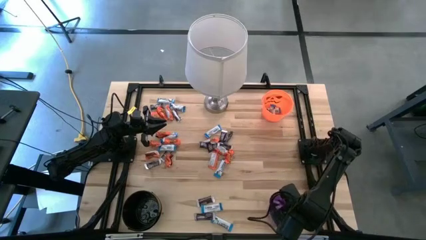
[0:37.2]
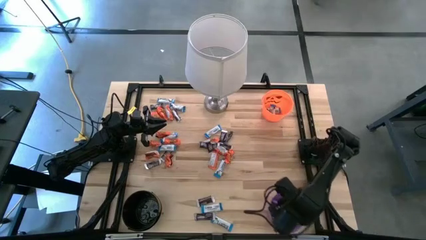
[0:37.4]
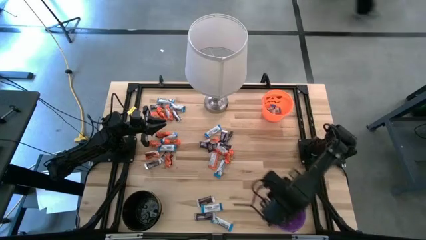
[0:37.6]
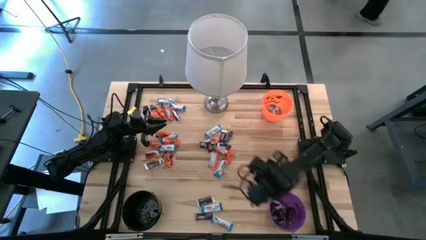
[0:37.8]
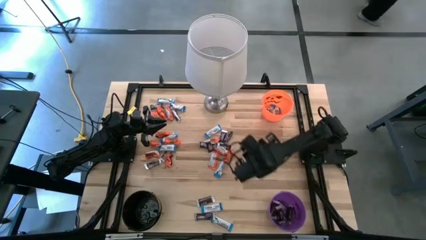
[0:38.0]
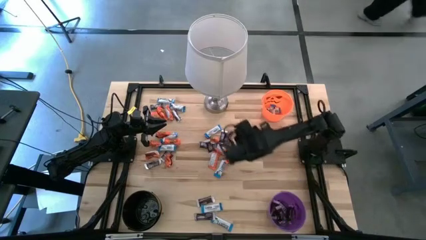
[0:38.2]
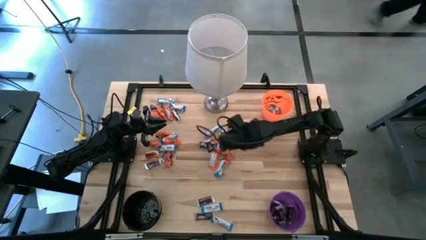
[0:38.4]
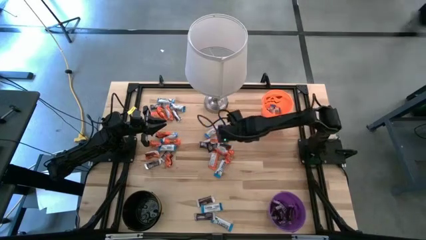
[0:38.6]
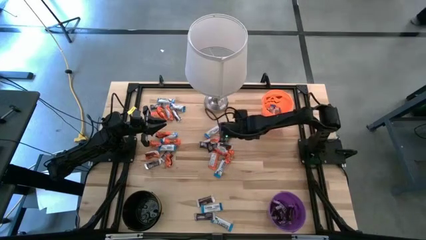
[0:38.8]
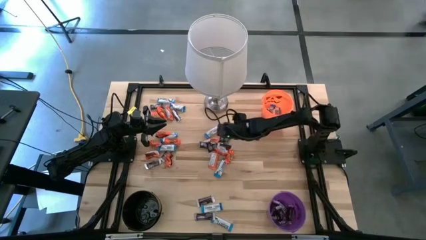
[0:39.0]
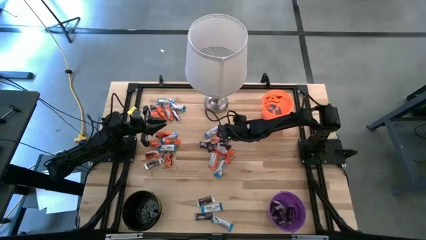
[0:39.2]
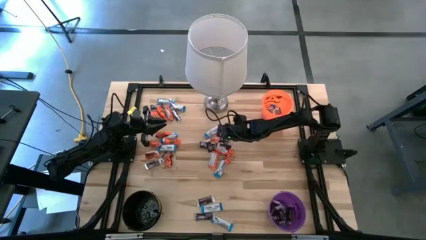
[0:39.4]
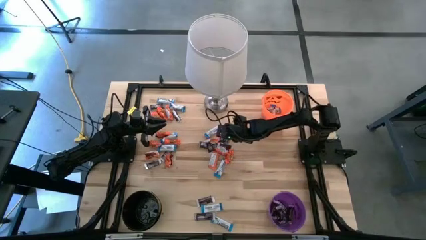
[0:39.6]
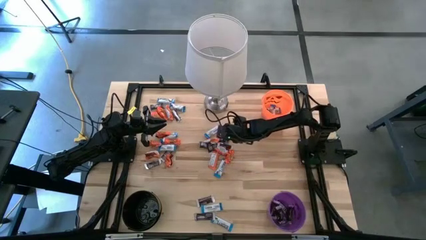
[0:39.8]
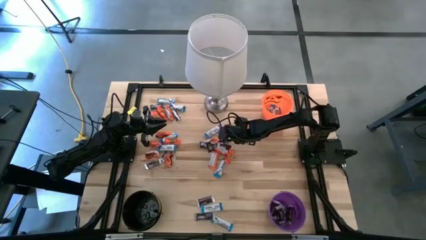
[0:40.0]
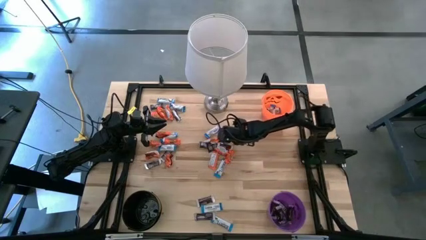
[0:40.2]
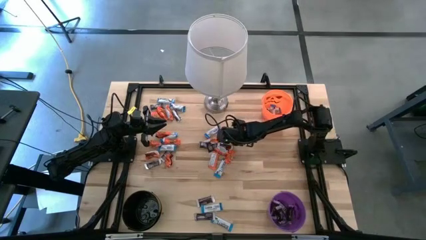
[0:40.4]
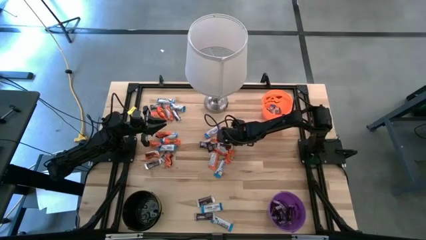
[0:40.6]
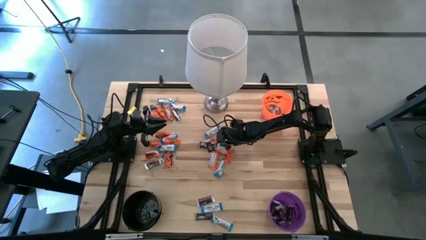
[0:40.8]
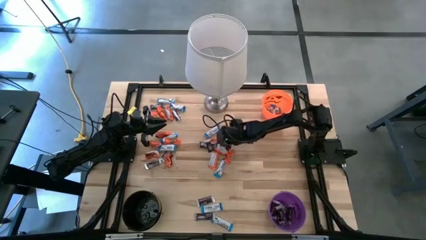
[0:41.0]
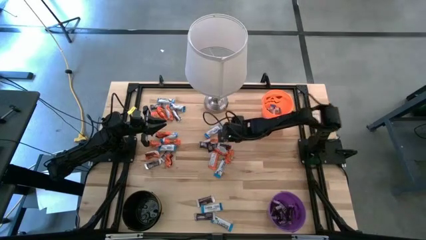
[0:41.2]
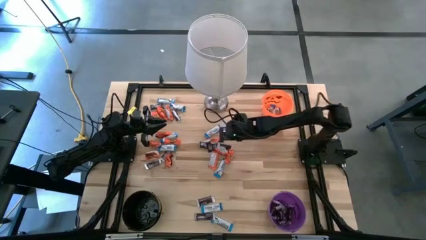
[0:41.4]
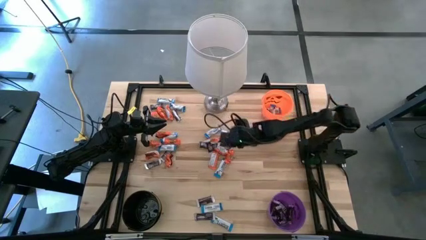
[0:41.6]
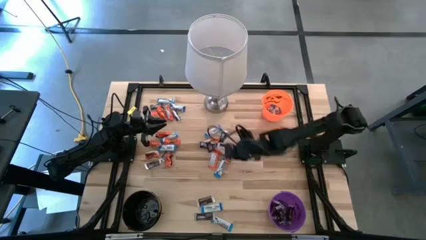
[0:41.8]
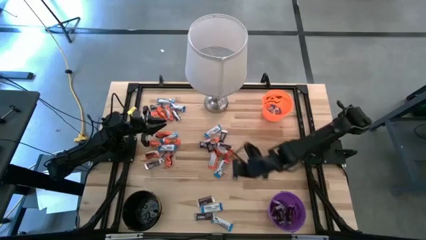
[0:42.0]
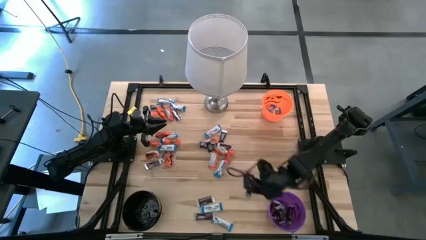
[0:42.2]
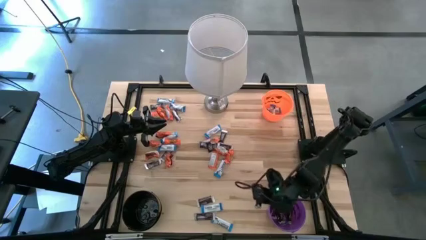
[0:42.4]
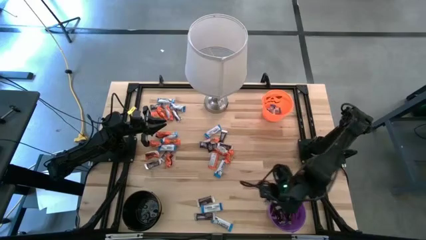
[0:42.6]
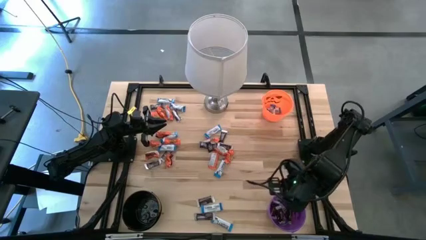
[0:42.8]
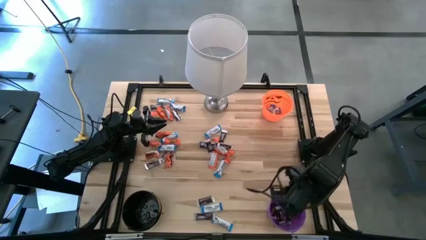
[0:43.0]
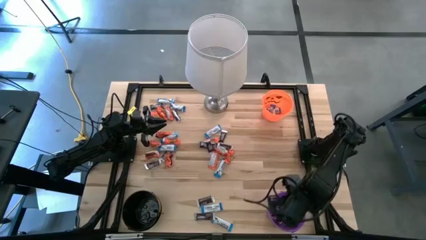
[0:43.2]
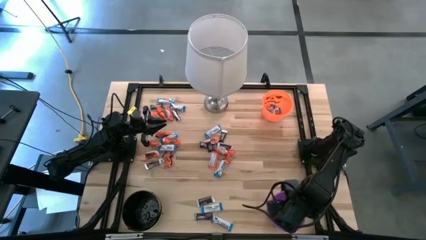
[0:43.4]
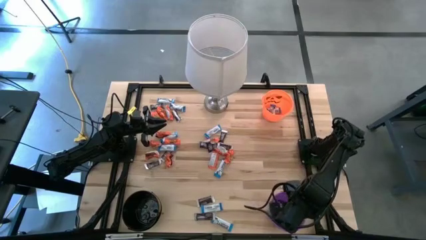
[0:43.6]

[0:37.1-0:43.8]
Task: Sort candy
Put the brown chocolate bar into the violet bucket

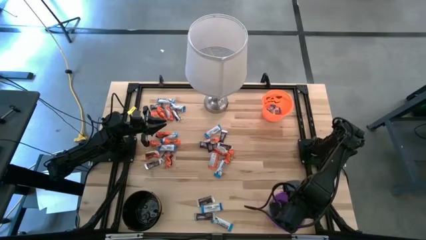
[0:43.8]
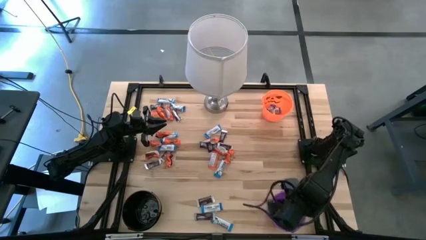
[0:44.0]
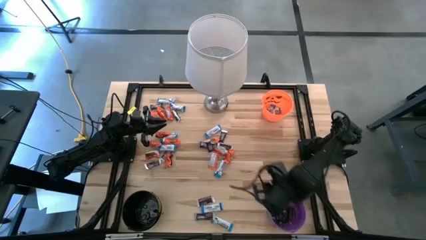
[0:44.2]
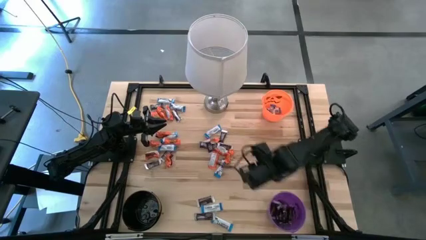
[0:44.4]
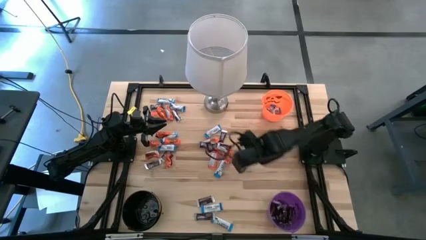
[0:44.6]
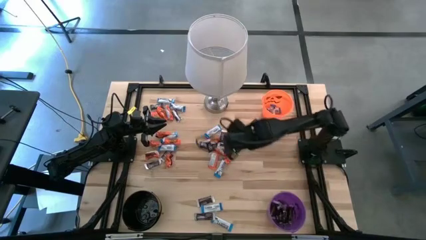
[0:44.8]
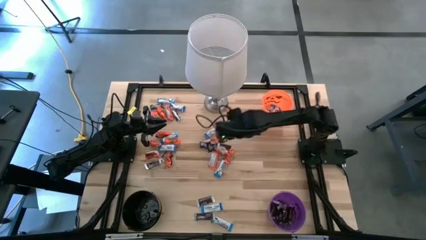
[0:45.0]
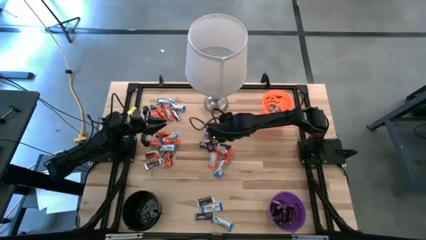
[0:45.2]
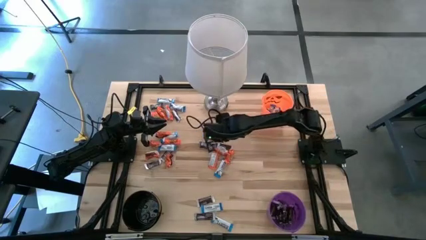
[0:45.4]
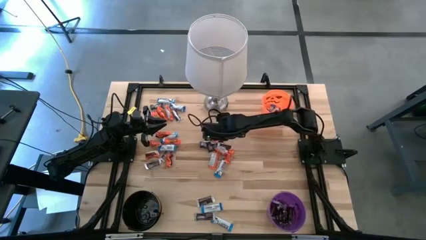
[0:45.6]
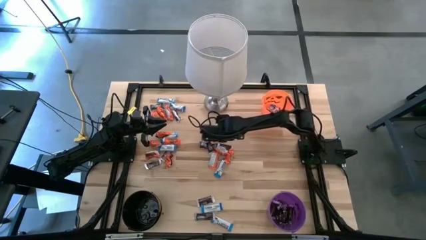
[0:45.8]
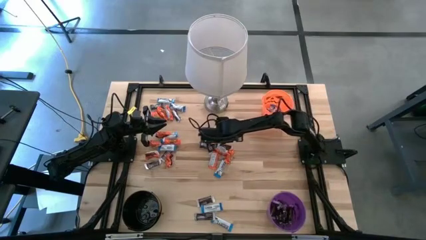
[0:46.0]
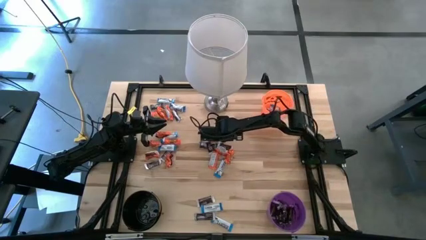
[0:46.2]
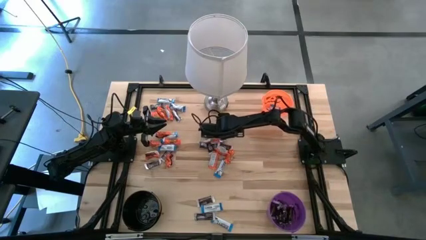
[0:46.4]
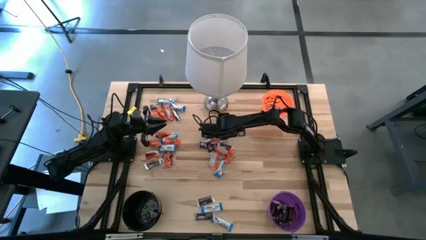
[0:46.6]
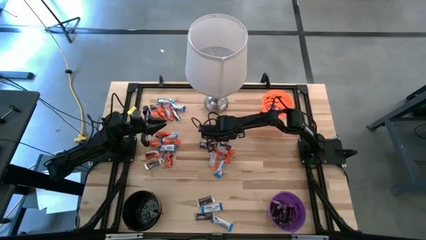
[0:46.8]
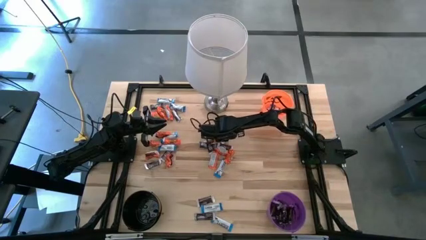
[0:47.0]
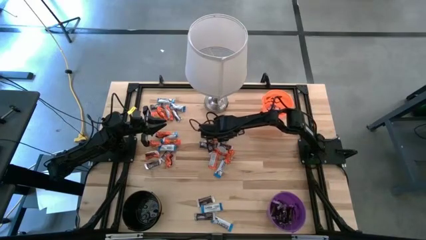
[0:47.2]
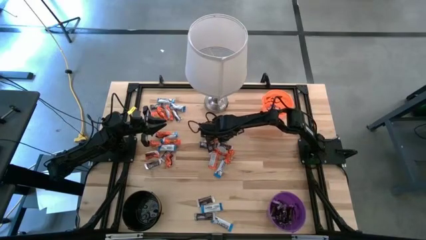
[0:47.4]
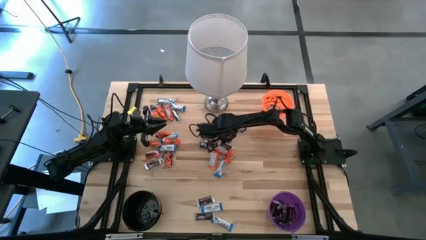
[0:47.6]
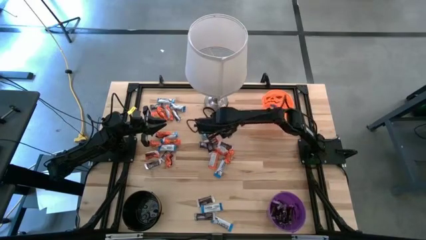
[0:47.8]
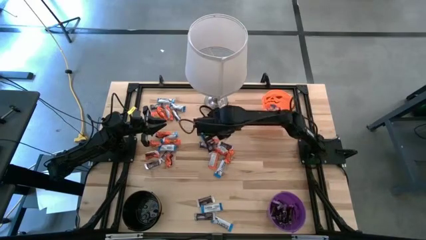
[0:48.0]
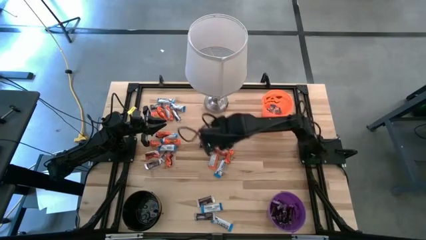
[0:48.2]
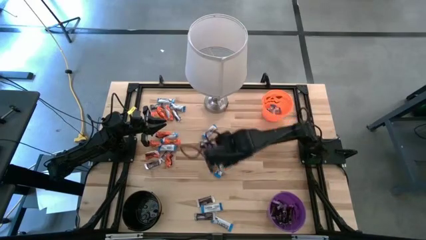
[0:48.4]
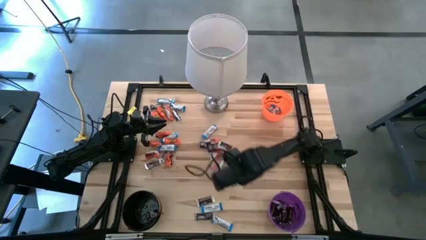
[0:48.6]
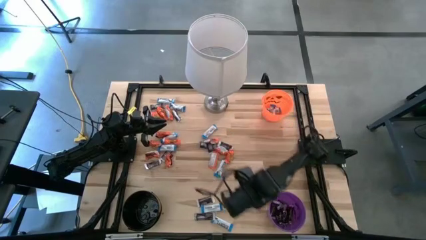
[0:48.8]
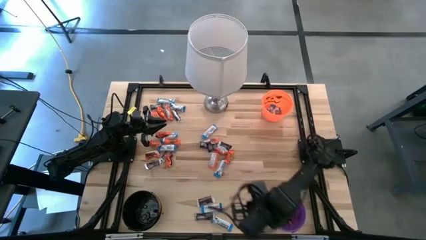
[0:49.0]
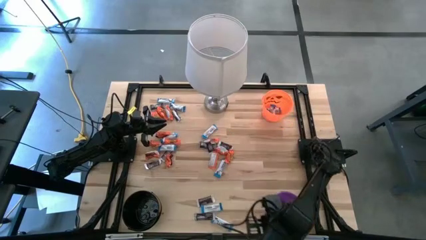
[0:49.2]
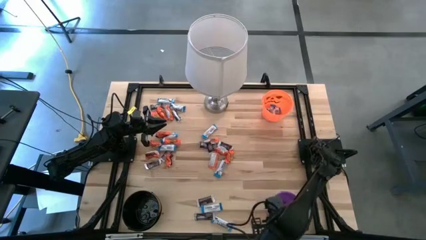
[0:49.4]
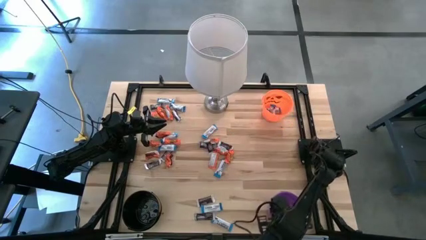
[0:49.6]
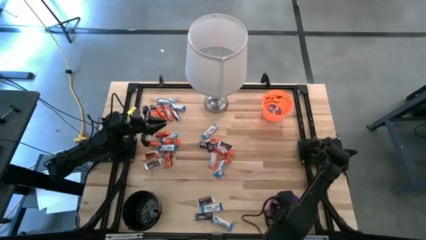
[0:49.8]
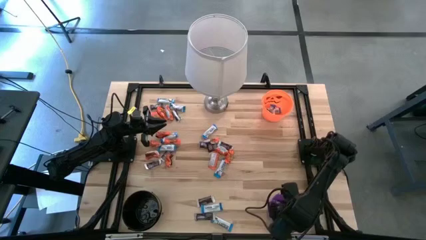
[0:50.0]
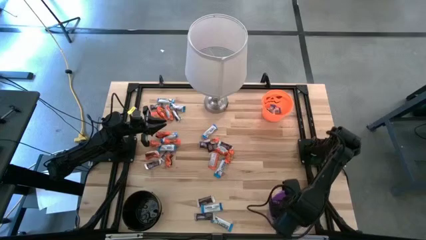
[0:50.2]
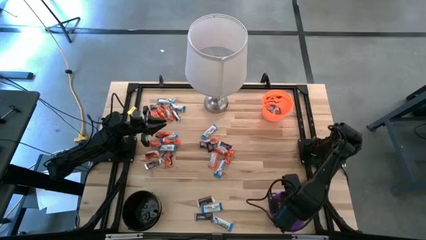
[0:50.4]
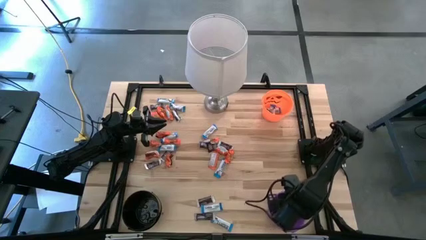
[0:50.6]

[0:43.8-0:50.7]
Put the brown chocolate bar into the violet bucket

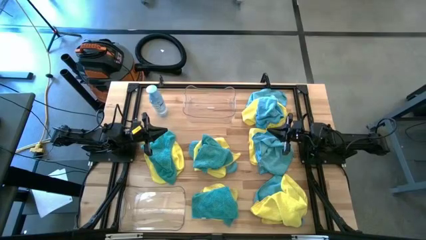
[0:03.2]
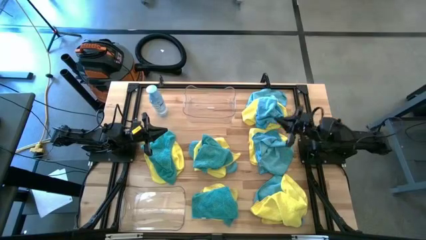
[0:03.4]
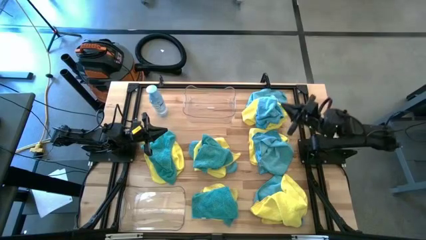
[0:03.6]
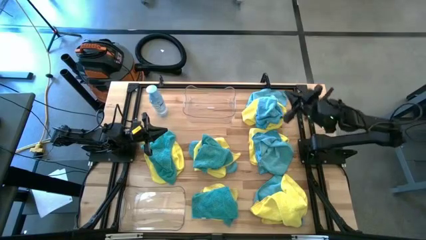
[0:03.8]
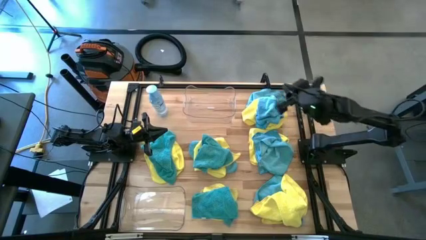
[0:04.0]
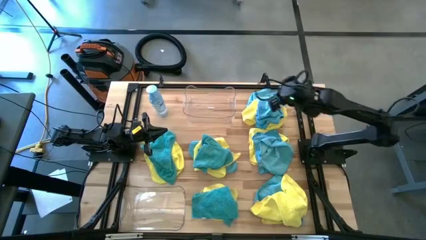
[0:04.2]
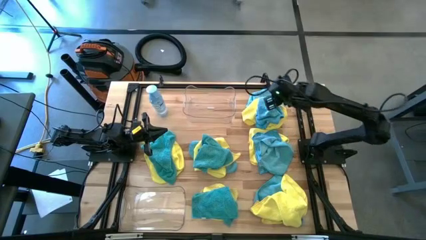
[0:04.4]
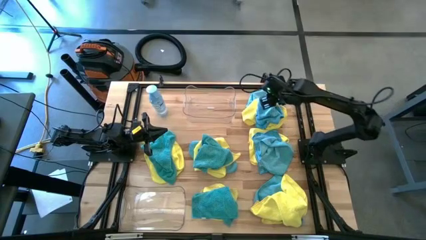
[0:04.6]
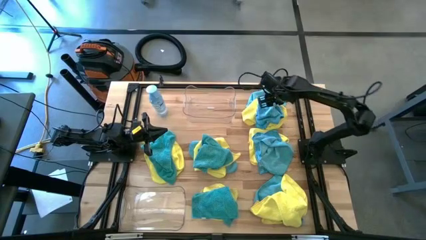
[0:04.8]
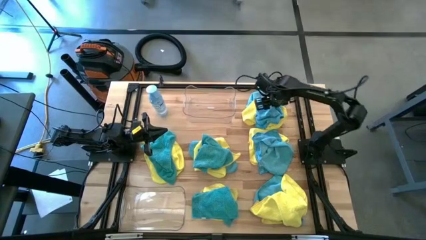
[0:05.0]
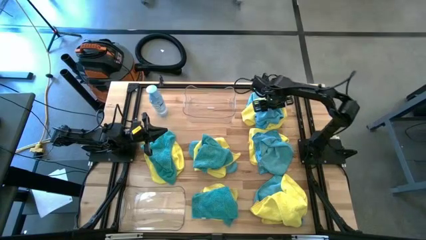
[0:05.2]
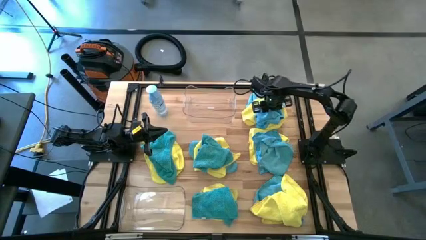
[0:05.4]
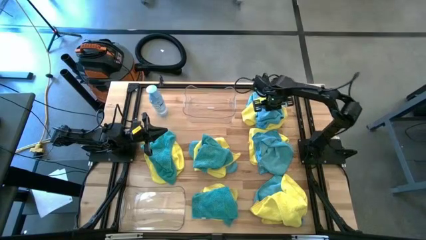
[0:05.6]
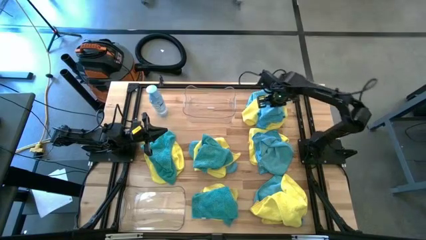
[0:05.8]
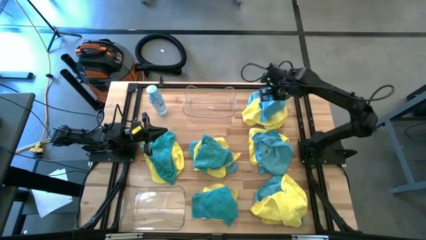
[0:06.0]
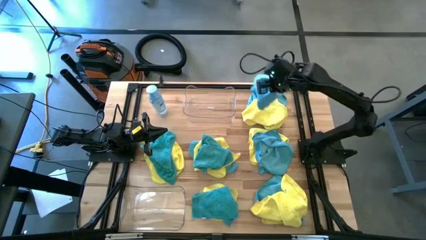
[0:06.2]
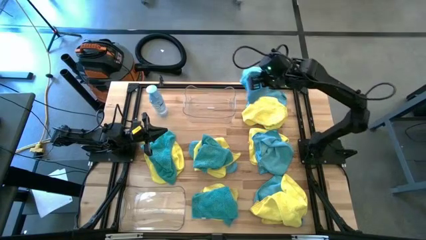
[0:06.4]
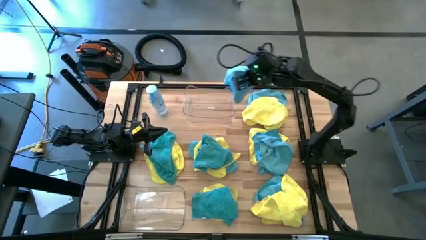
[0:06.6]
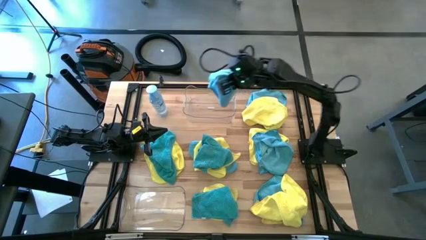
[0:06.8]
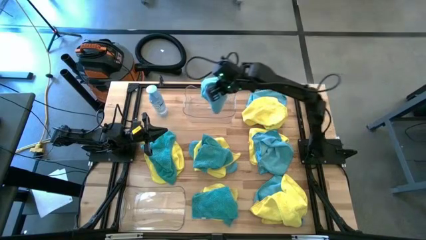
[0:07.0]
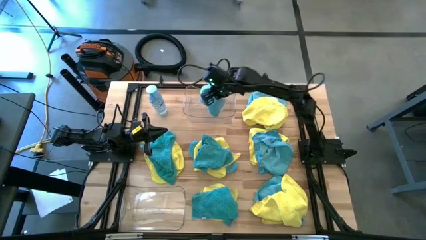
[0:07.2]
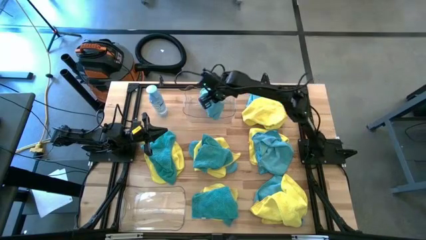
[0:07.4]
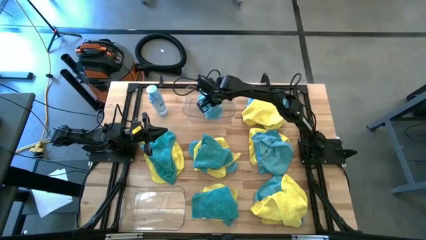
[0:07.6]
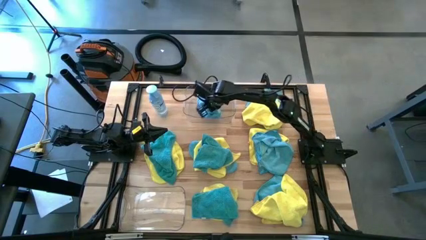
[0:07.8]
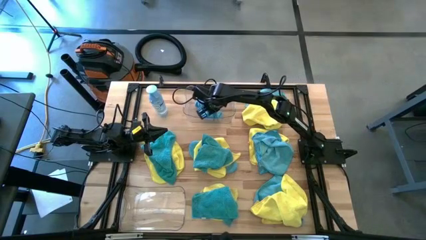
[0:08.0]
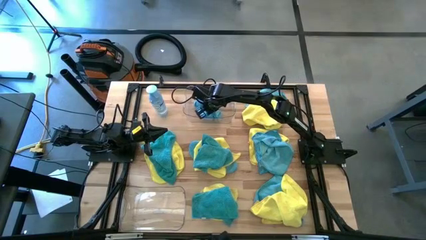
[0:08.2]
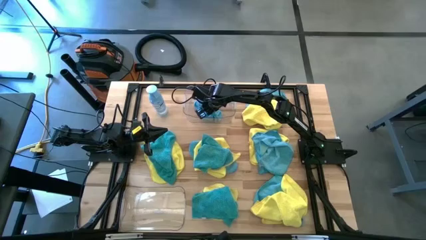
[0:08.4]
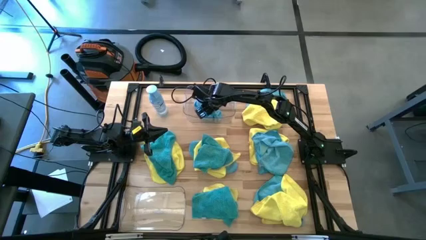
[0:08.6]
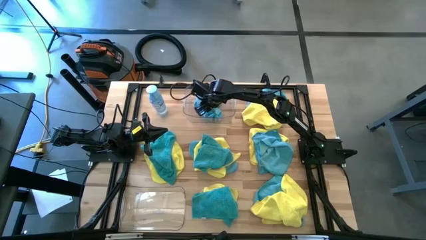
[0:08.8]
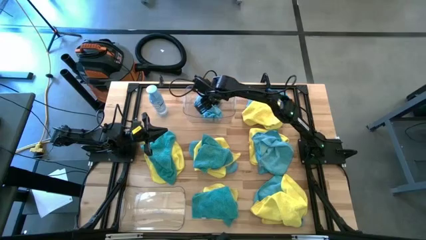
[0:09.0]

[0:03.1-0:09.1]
Task: Sort microfiber towel by color & place in baskets
Put the blue microfiber towel into the top transparent bin
